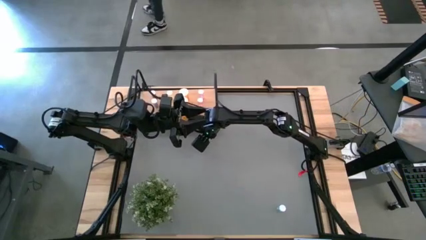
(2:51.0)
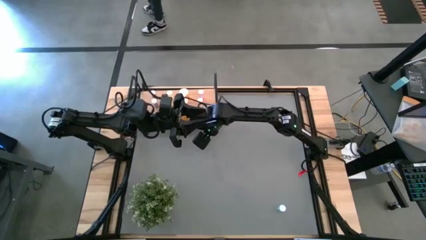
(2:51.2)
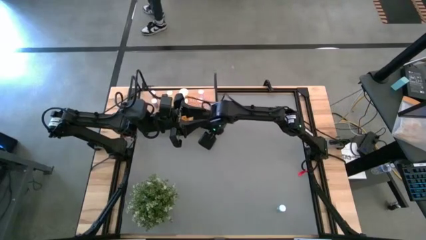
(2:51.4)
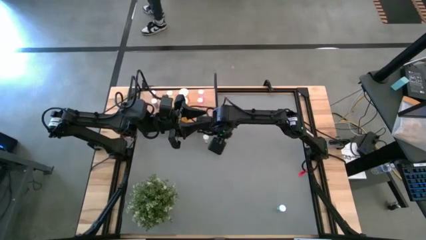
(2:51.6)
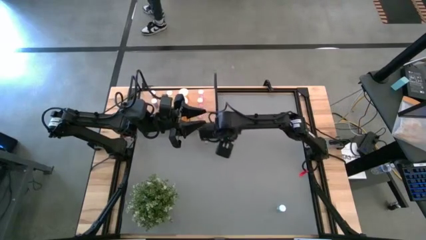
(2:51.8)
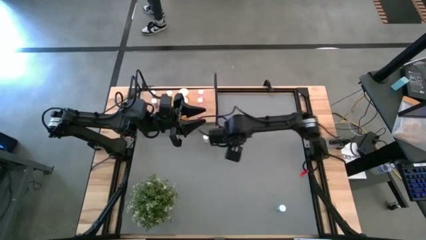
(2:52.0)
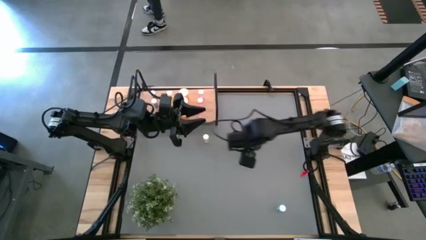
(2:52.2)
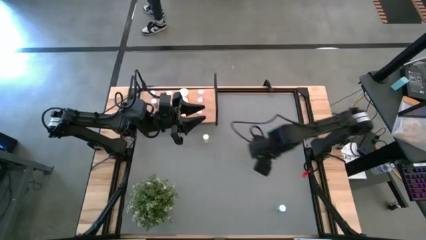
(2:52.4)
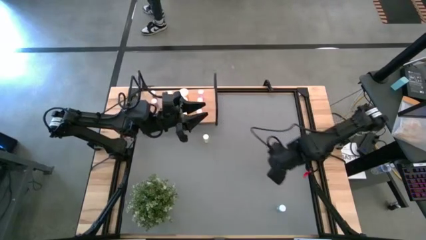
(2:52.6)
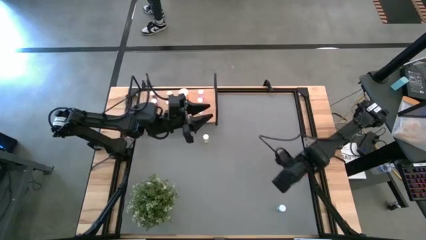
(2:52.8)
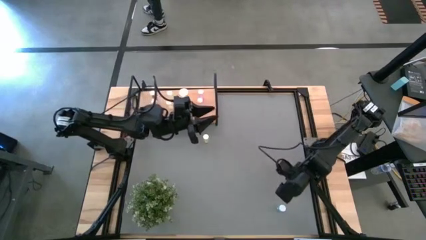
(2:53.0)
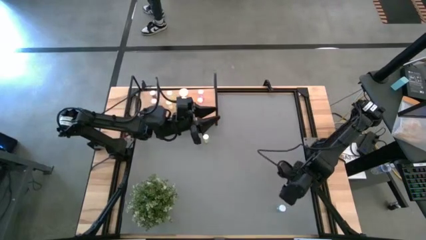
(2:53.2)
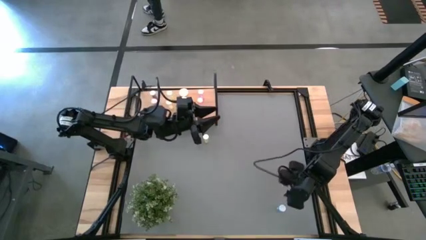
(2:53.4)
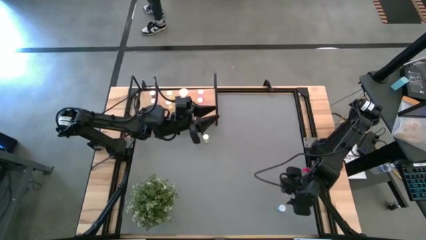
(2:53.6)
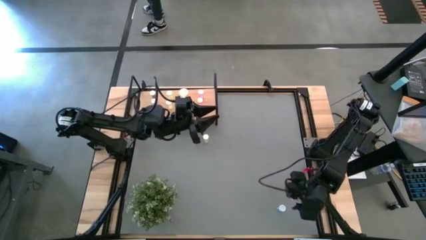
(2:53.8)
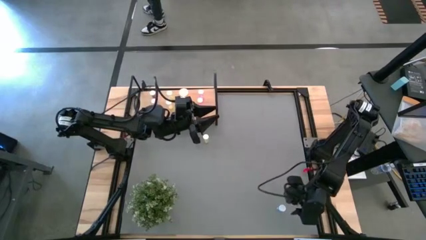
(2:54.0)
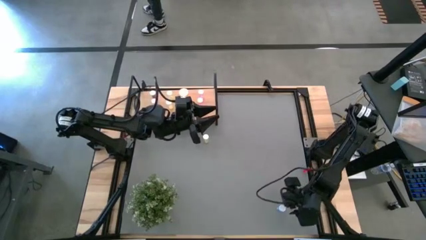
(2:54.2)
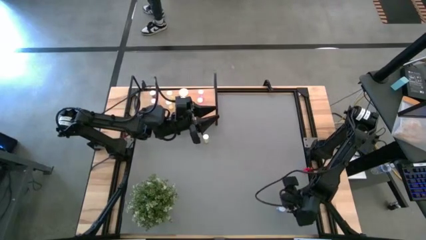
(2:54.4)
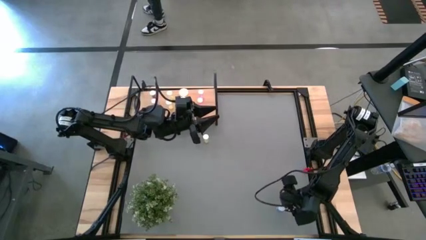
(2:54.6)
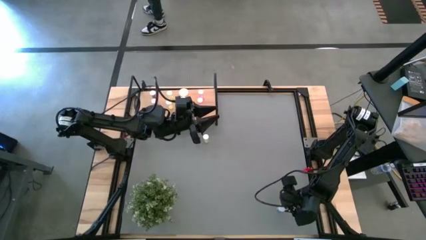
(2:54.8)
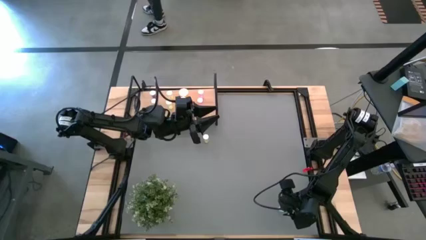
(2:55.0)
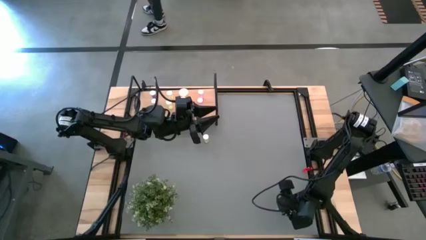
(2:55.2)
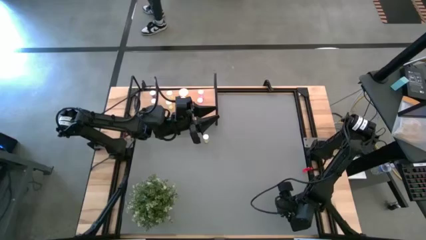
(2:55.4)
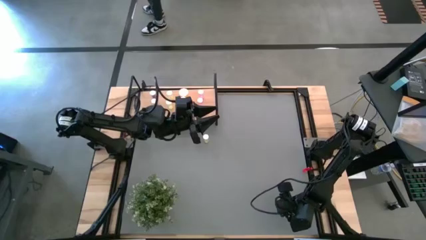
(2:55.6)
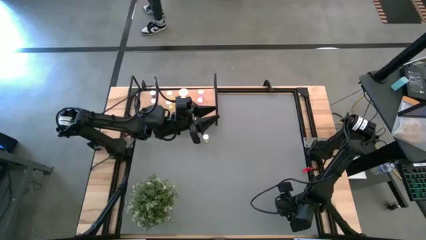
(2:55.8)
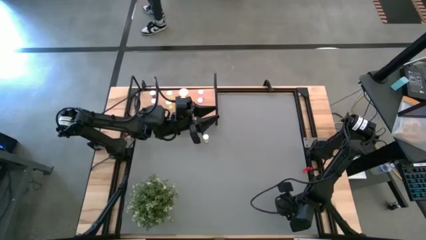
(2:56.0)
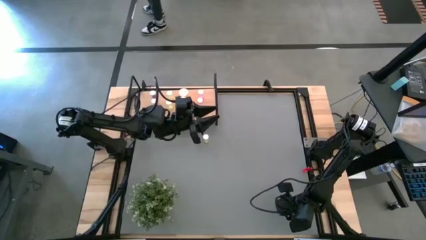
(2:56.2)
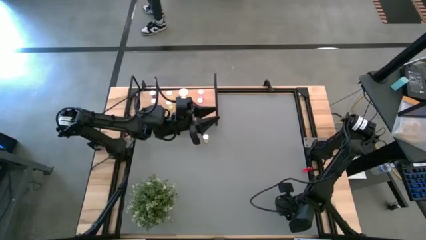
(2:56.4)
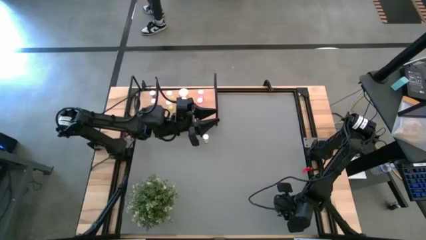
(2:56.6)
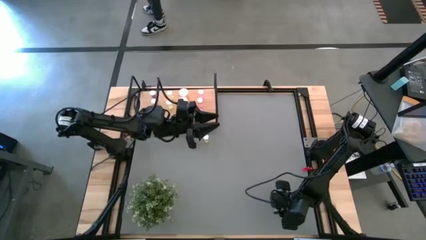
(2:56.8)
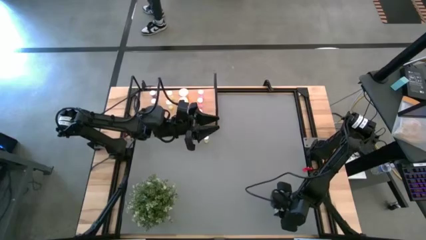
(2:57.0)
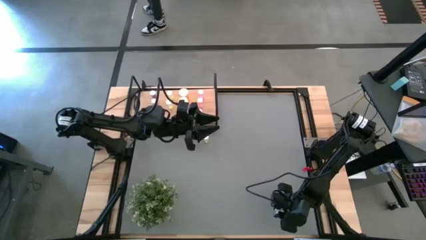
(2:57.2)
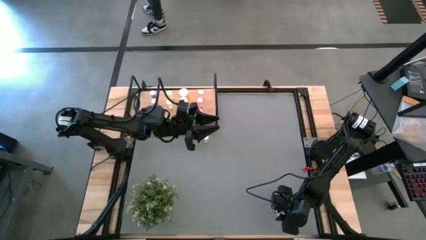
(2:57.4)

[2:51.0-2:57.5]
Task: Pick and place medicine bottles onto shelf by color
Move the blue pill bottle to the middle left of the table

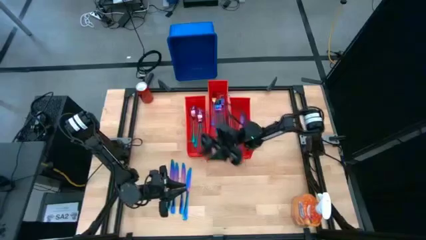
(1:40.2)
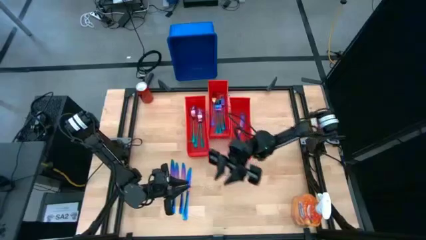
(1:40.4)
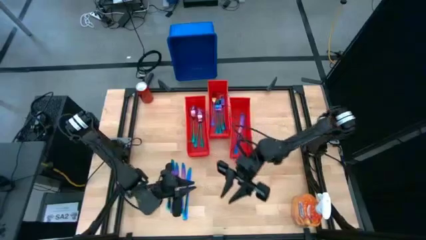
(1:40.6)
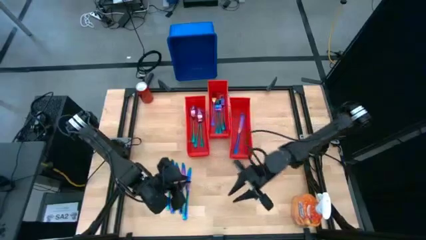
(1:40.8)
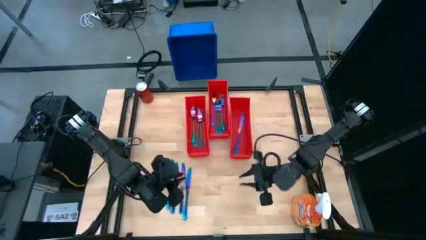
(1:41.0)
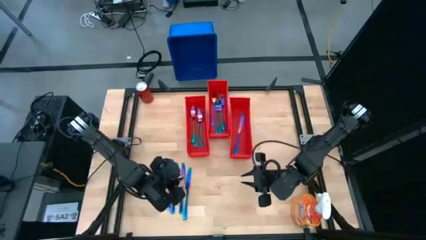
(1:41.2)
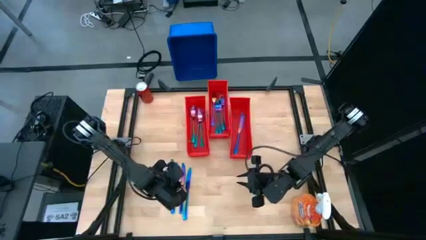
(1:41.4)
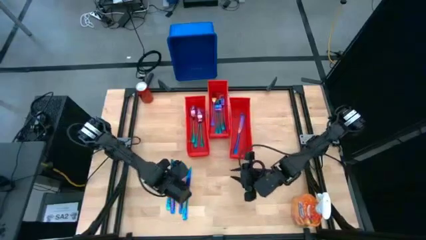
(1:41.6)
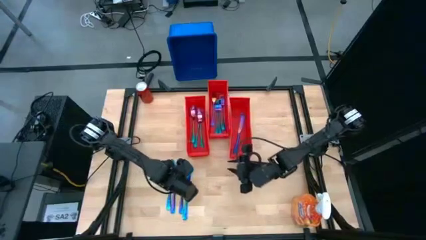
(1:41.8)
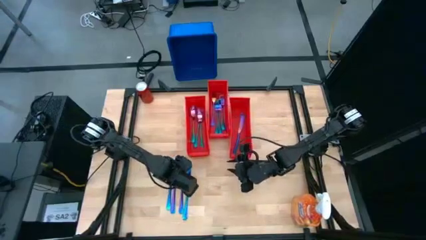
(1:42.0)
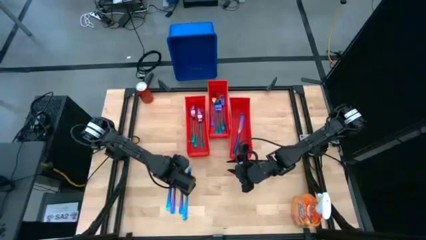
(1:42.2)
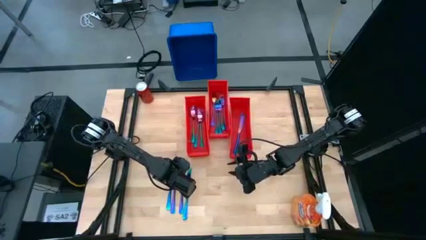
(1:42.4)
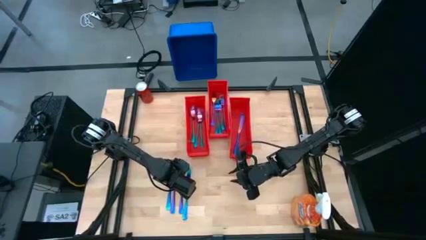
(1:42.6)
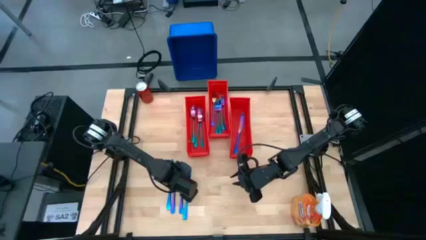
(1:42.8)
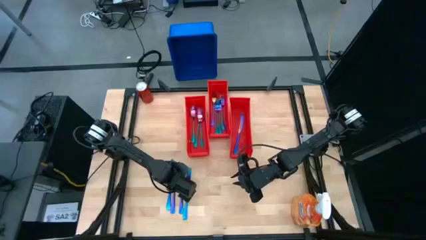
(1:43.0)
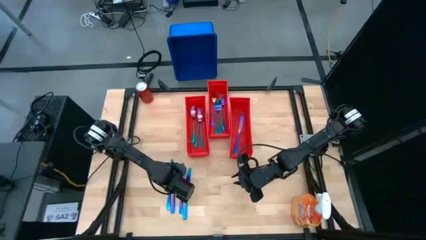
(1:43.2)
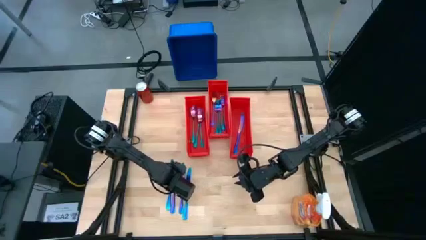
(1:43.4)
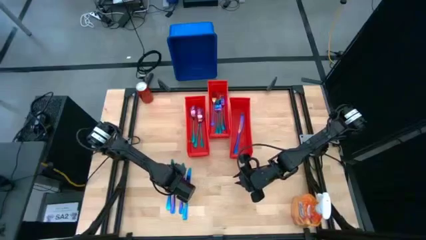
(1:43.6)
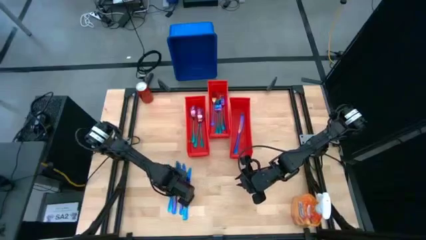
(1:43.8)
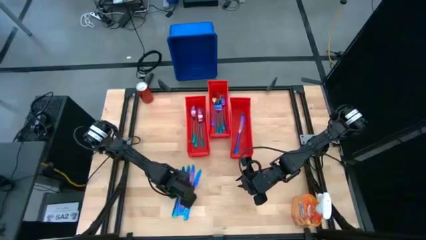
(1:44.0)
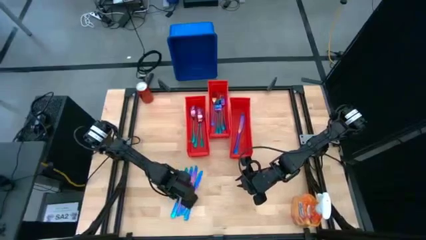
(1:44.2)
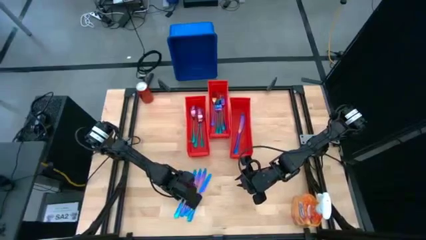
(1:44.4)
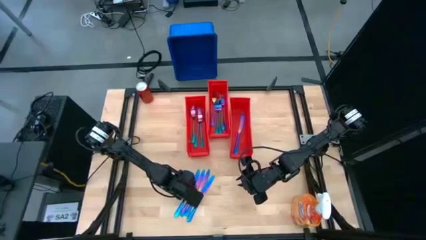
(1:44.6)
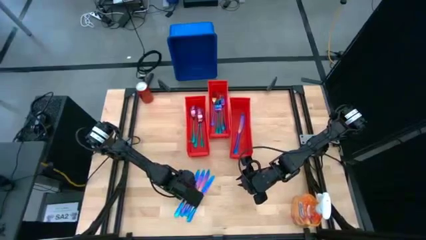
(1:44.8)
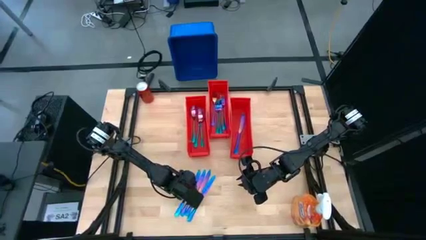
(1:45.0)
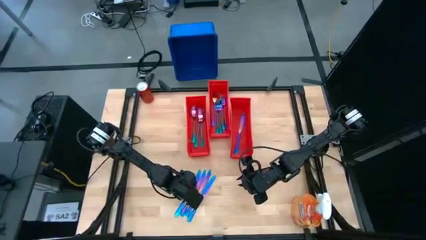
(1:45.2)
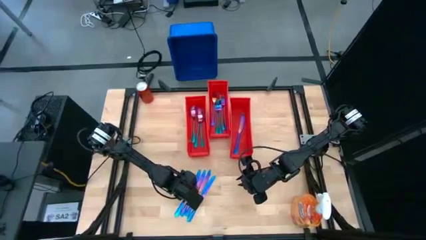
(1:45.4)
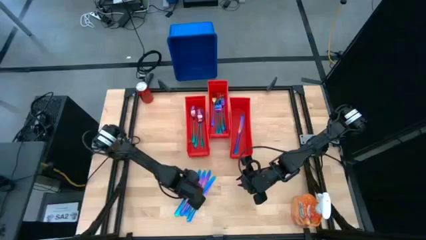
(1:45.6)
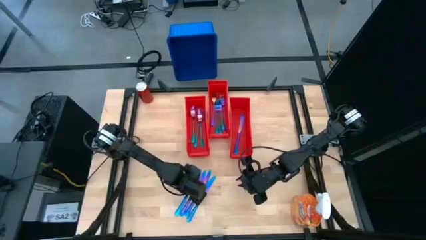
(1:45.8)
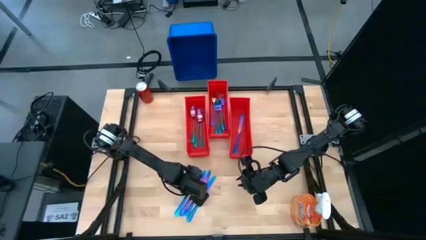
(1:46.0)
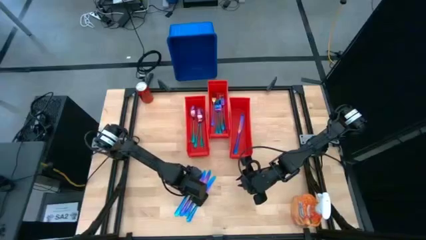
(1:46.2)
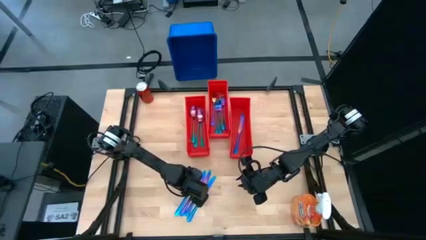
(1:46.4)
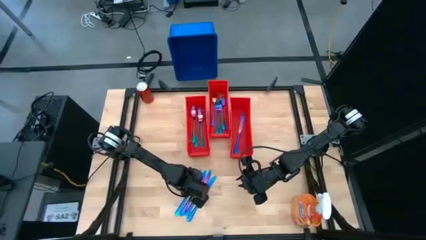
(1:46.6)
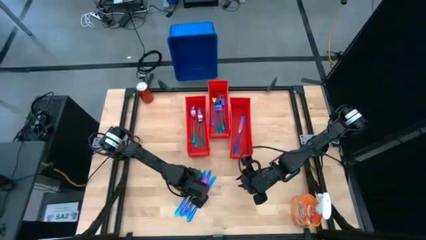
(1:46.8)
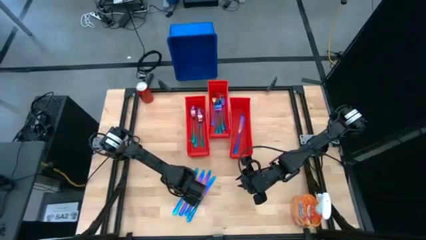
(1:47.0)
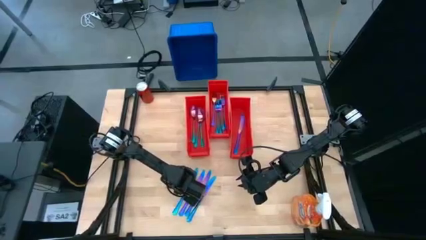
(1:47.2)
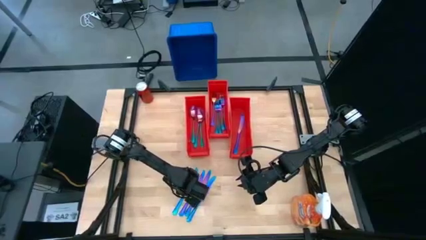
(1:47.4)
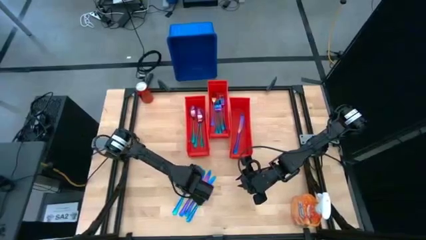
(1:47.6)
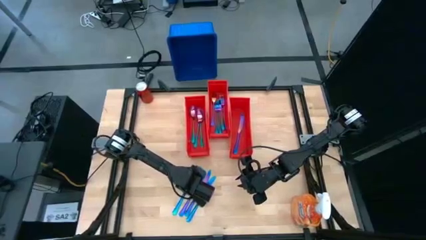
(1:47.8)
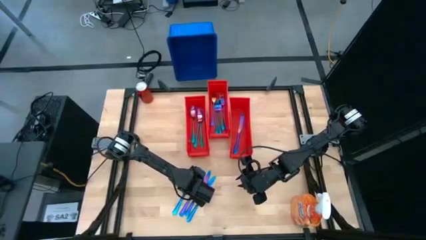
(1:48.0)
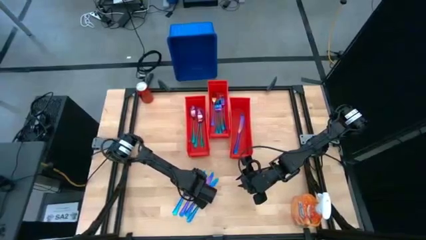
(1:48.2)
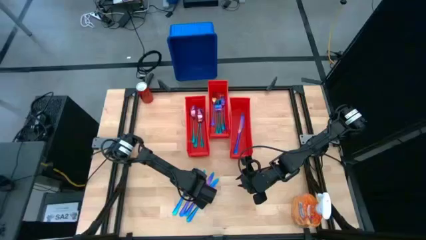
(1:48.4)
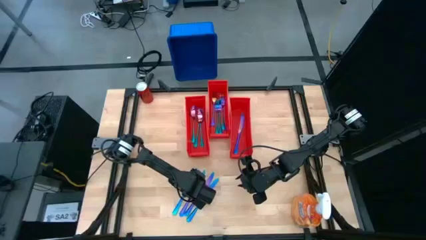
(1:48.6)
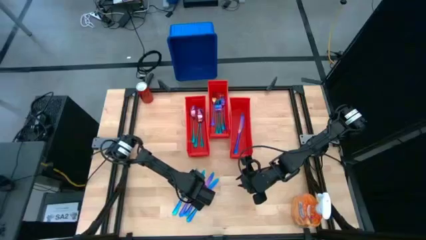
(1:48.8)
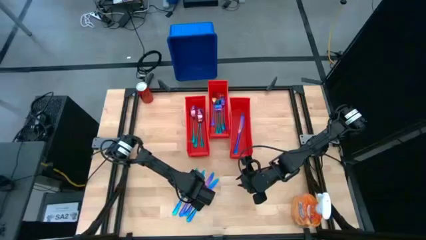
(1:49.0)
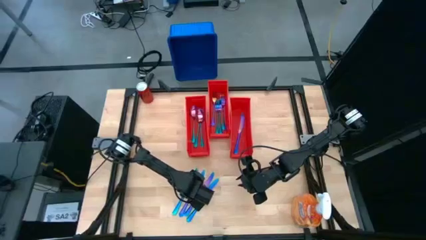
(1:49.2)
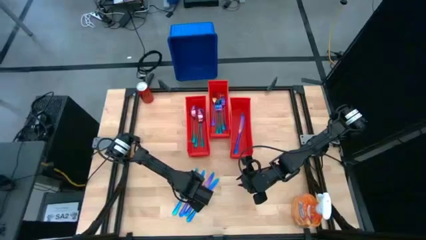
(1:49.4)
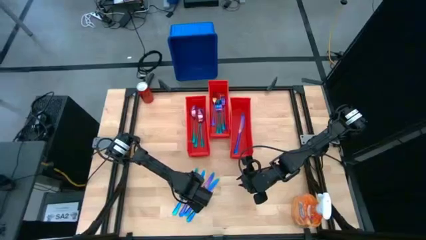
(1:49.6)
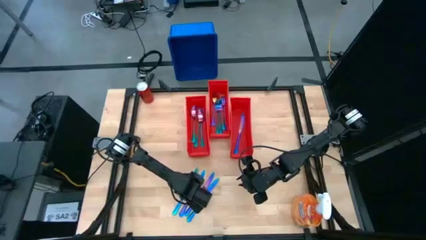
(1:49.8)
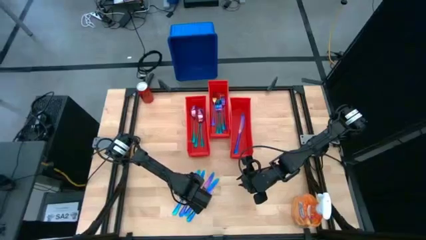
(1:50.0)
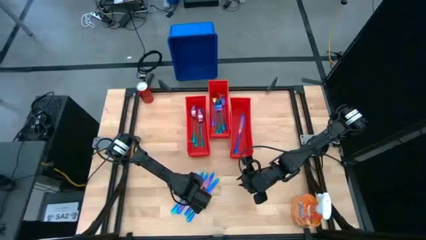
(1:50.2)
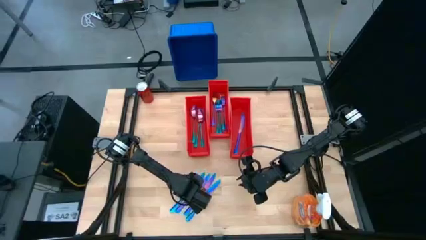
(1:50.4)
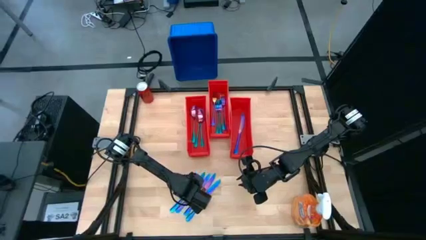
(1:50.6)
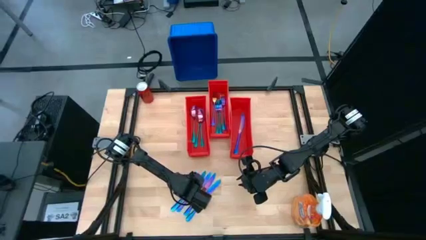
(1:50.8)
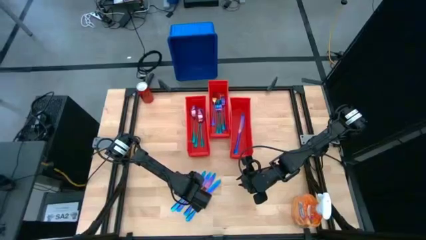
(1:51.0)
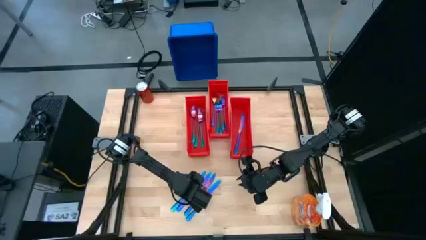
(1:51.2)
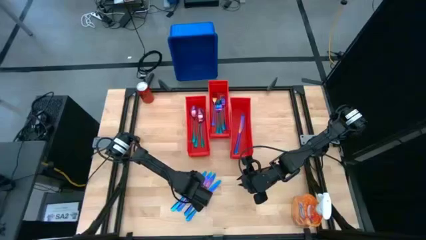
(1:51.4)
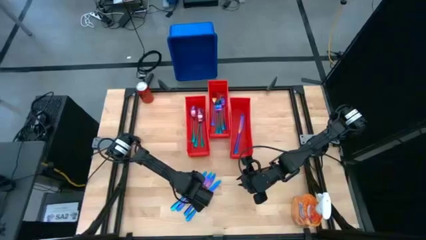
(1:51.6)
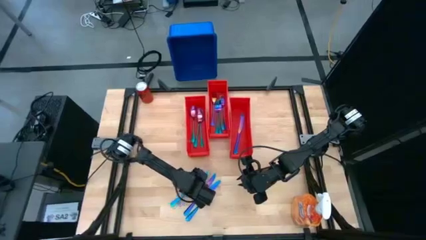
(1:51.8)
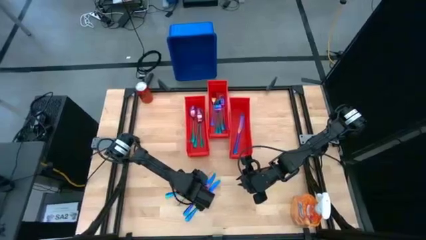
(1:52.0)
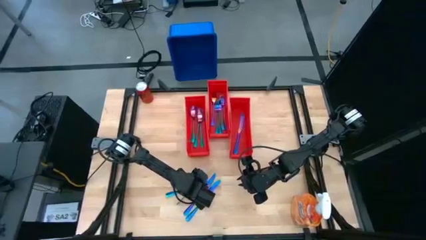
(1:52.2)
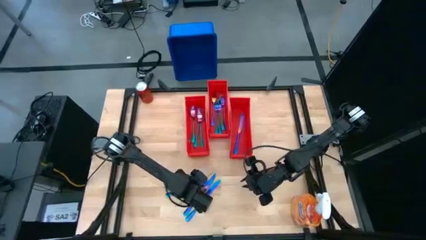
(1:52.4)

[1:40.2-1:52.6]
Task: Sort silverware
Put the iridescent knife into the right orange bin
